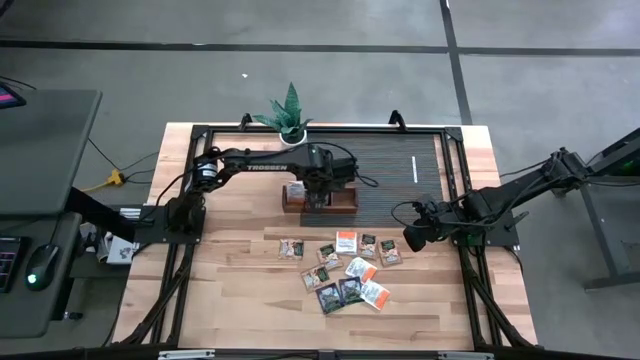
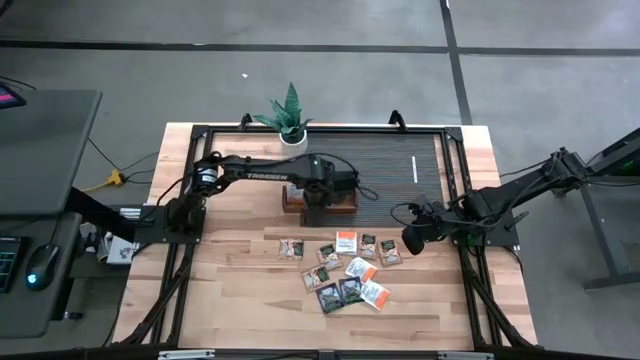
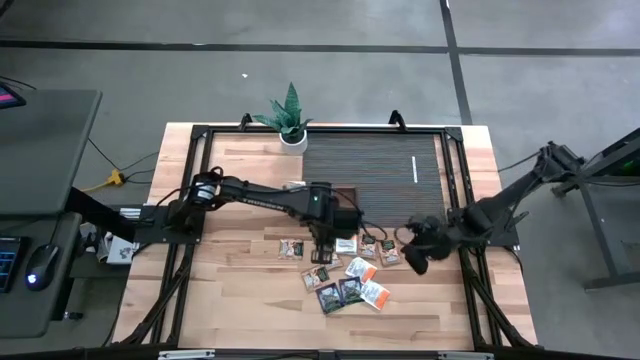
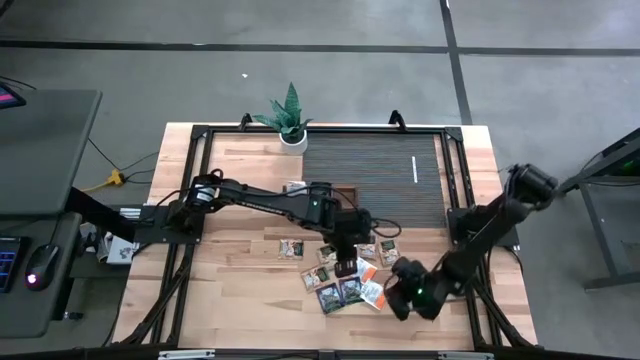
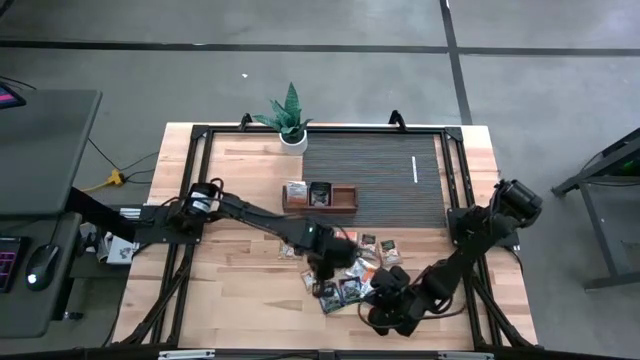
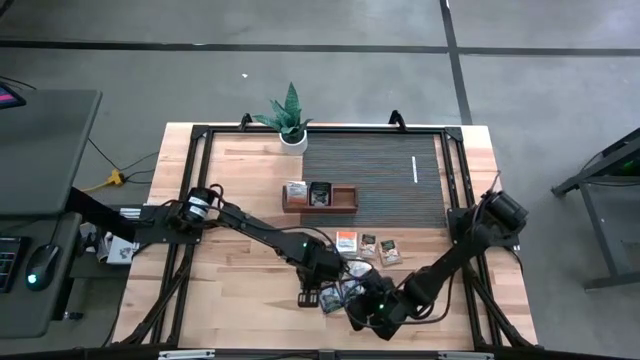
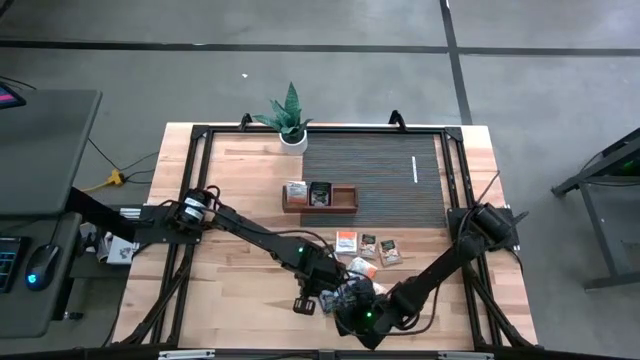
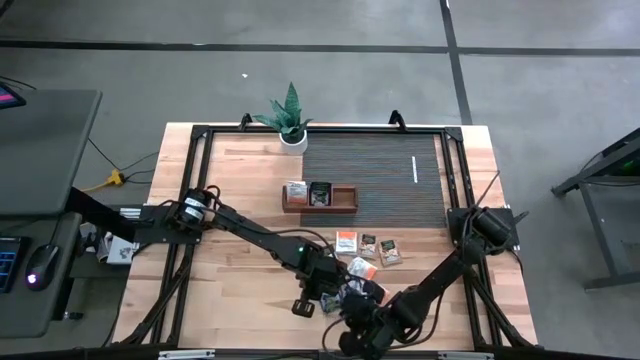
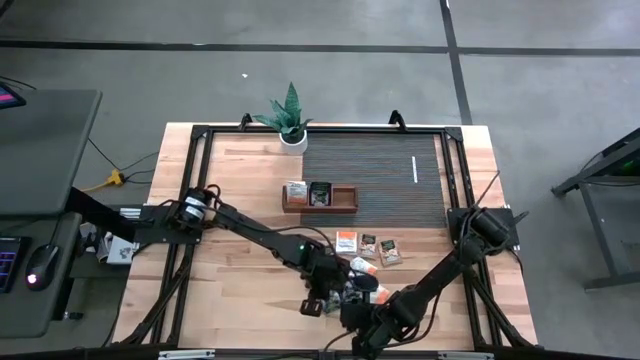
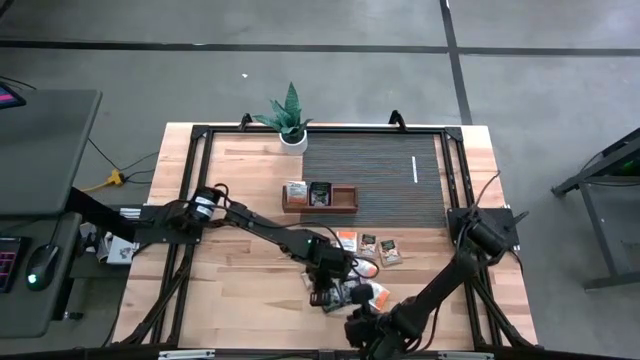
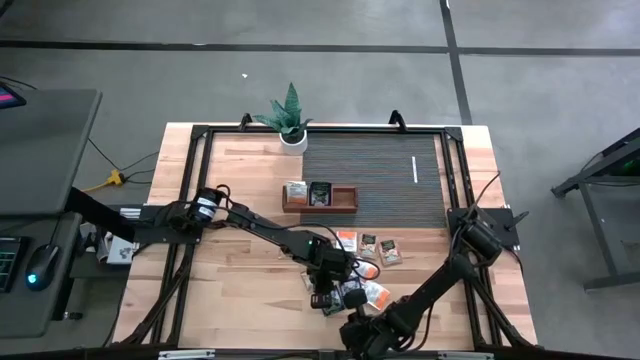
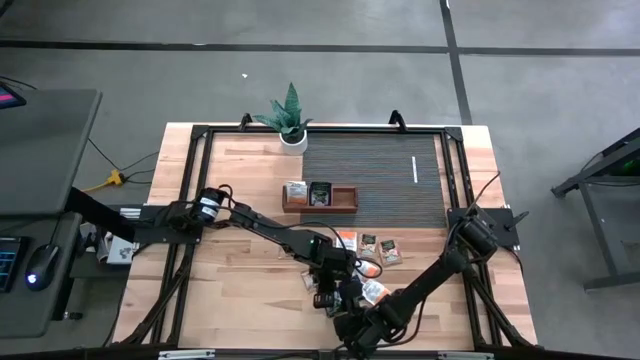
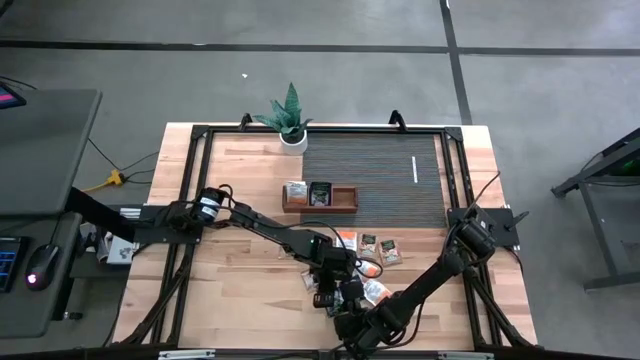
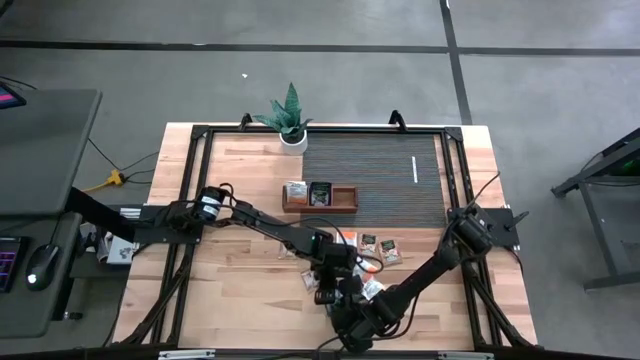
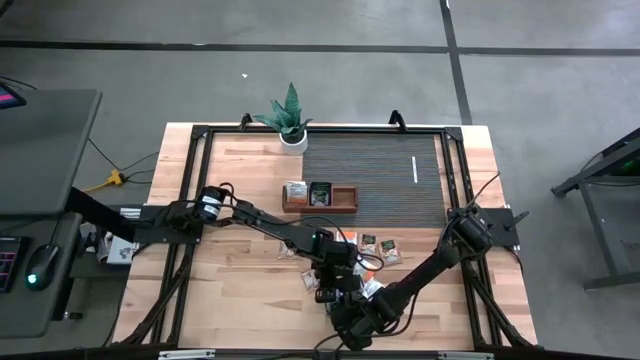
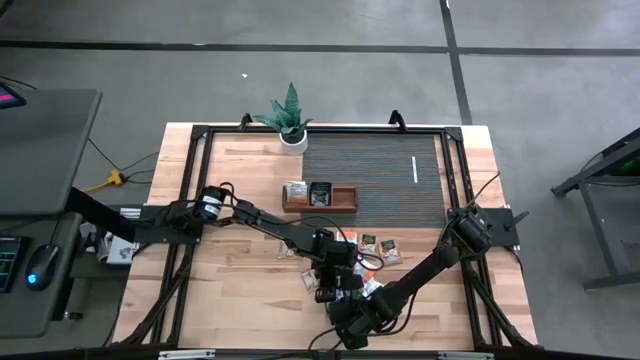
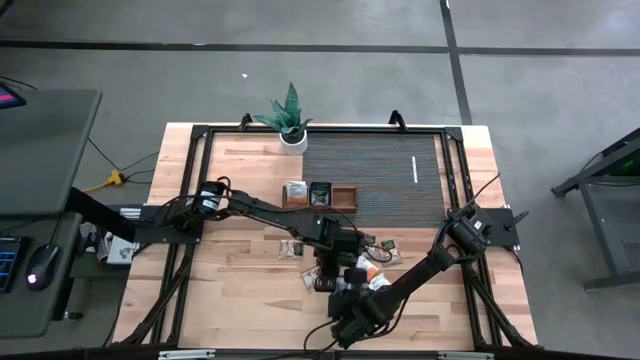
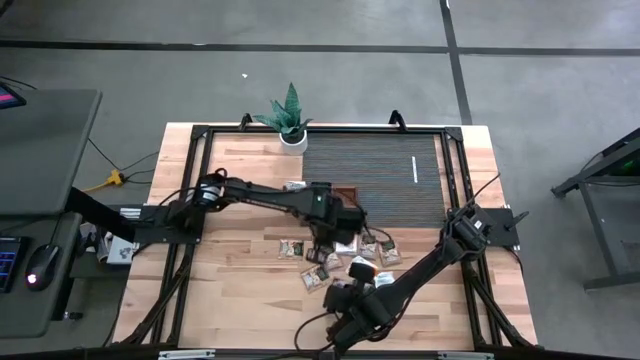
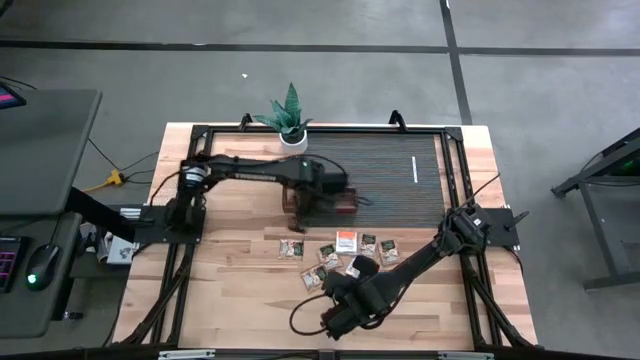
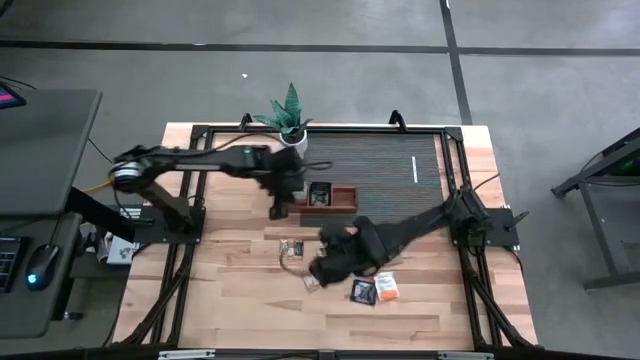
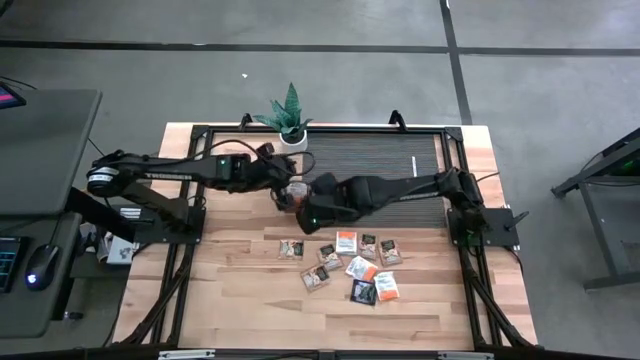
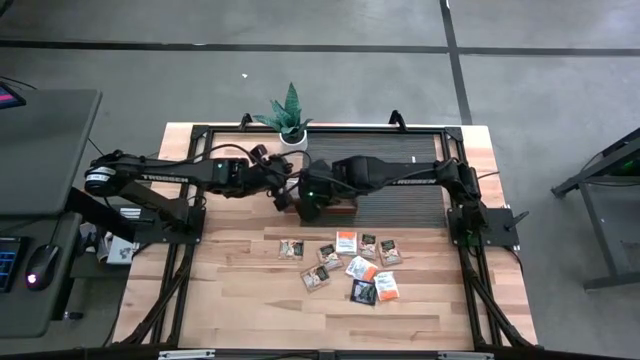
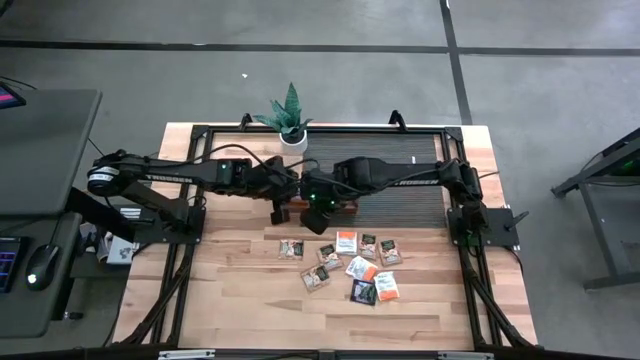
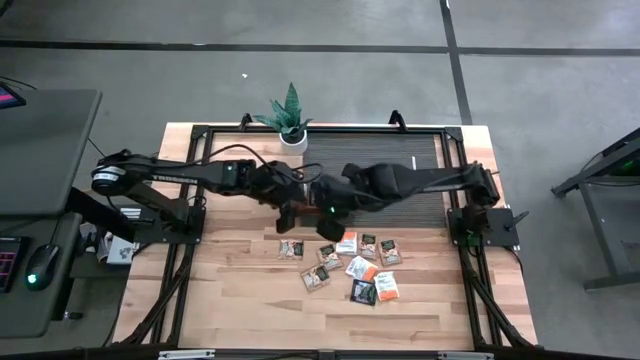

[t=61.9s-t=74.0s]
Task: Pick & Place Tea
Put the blue tea bag into the middle section of the wooden organizer

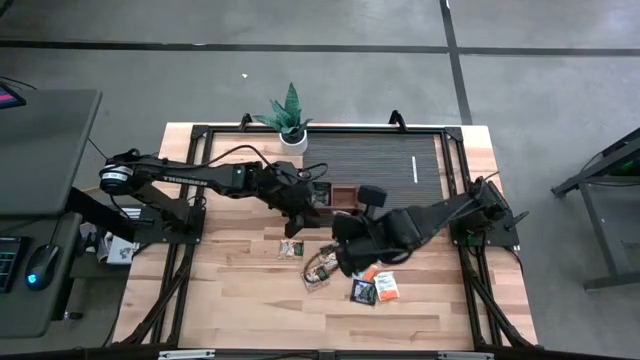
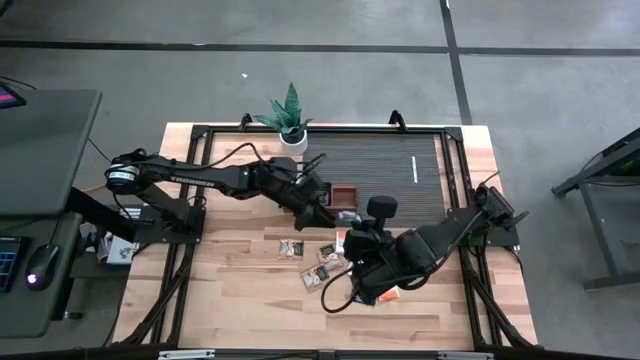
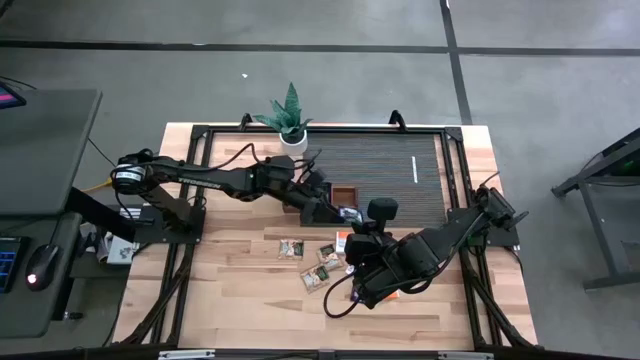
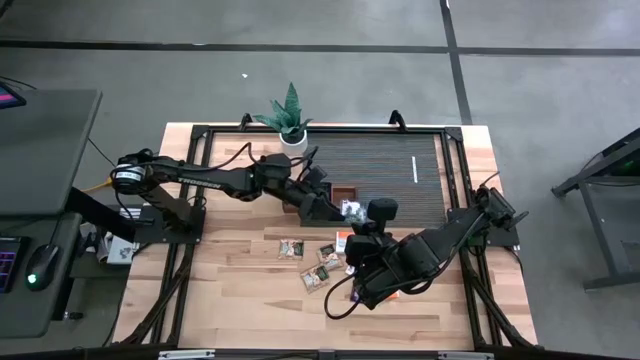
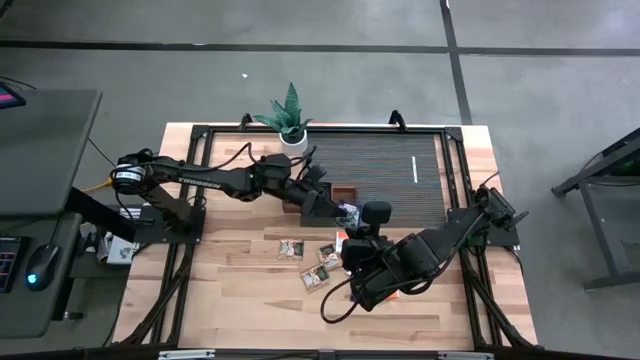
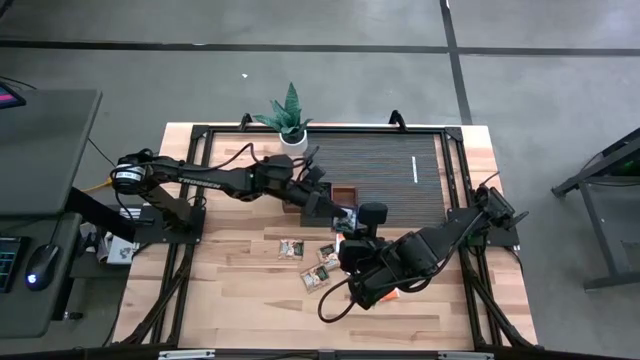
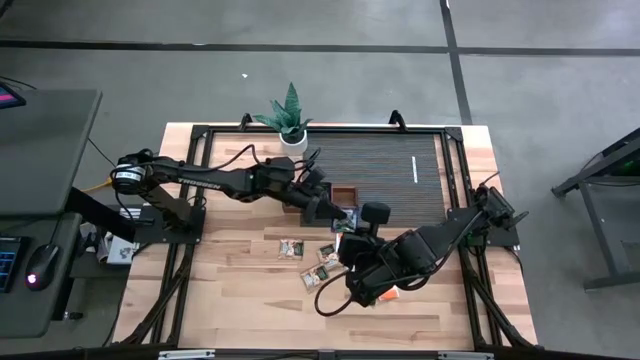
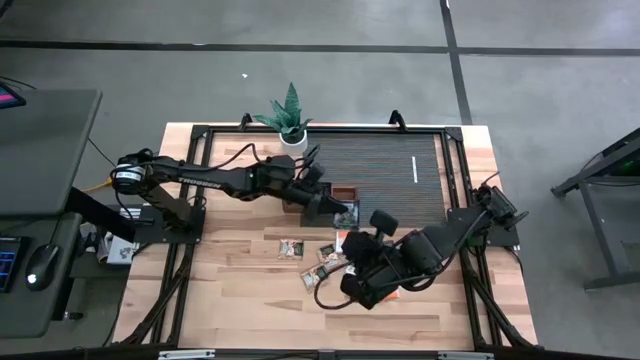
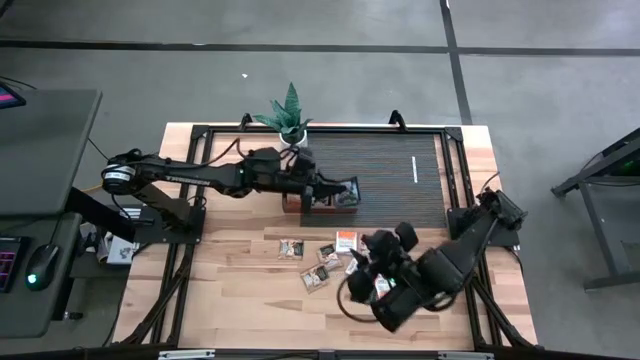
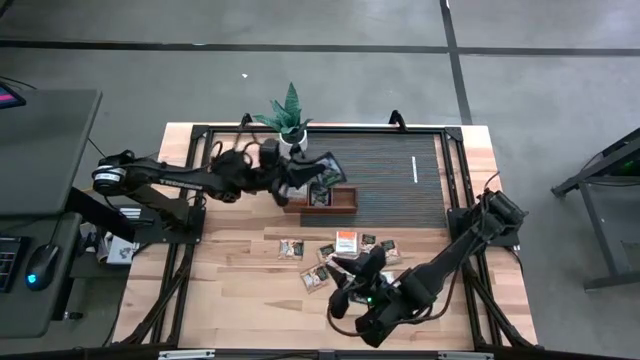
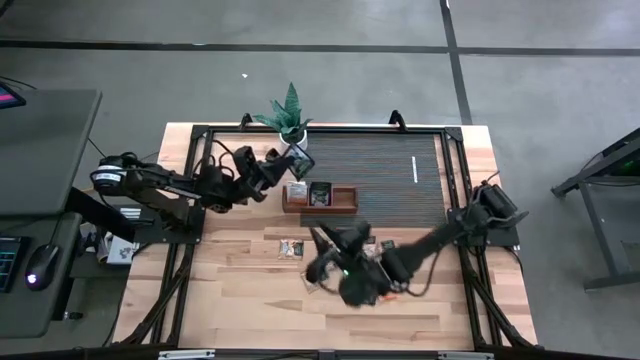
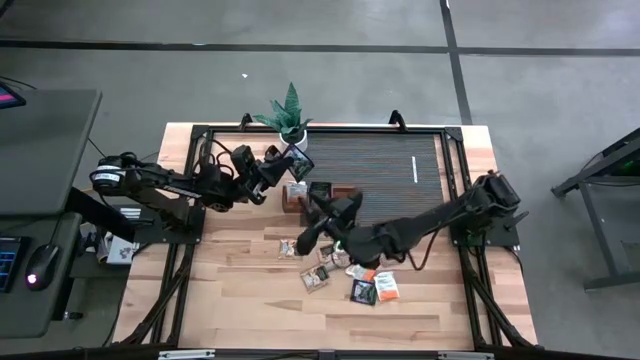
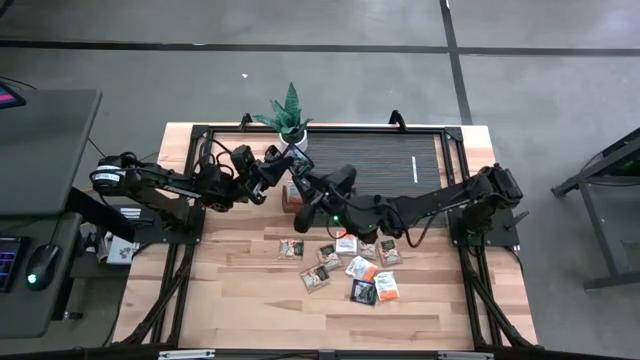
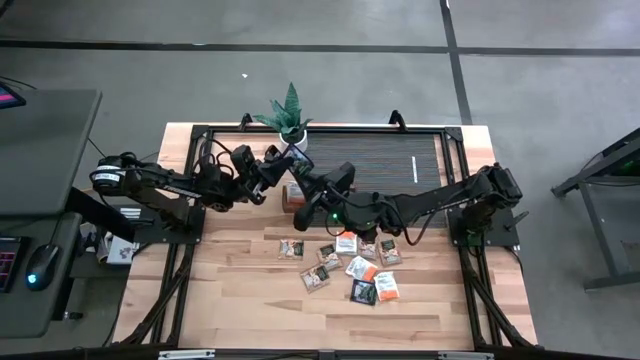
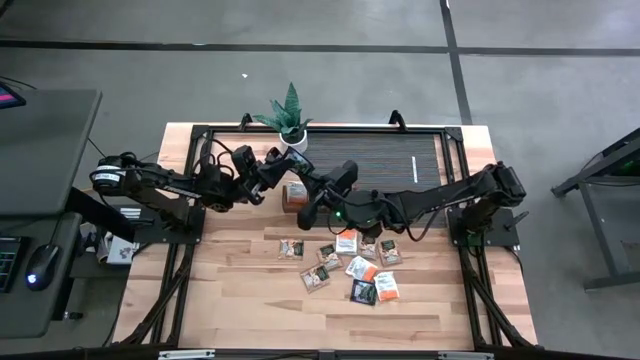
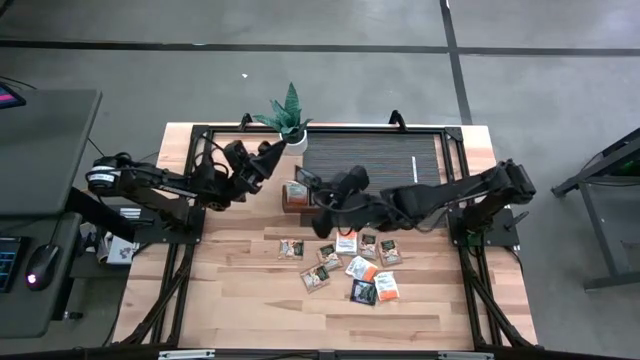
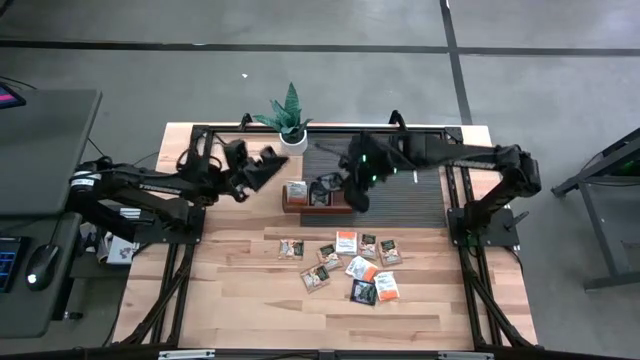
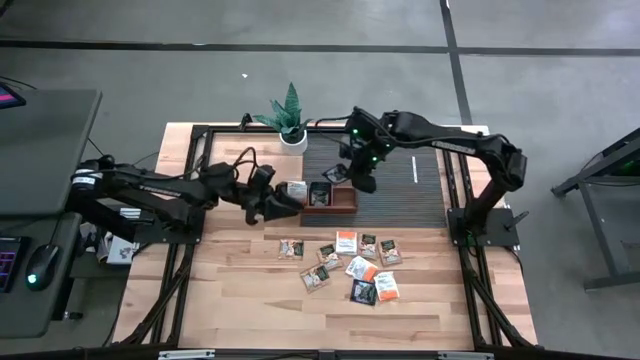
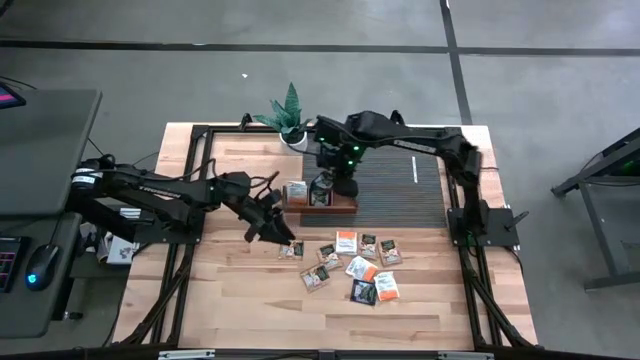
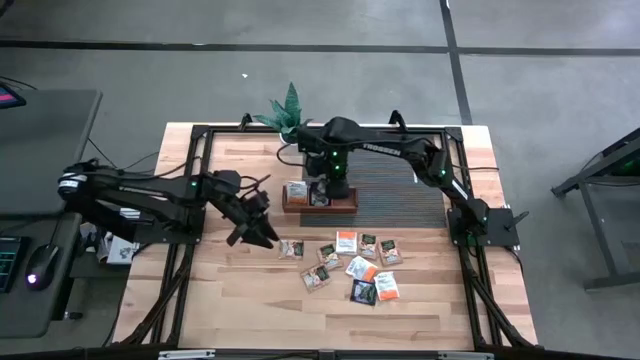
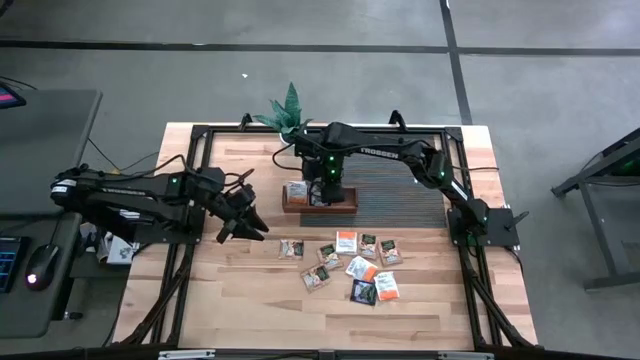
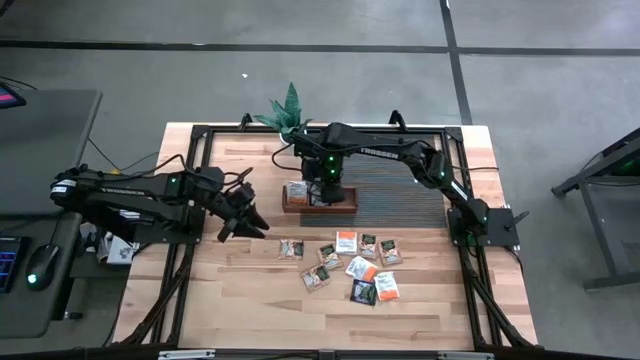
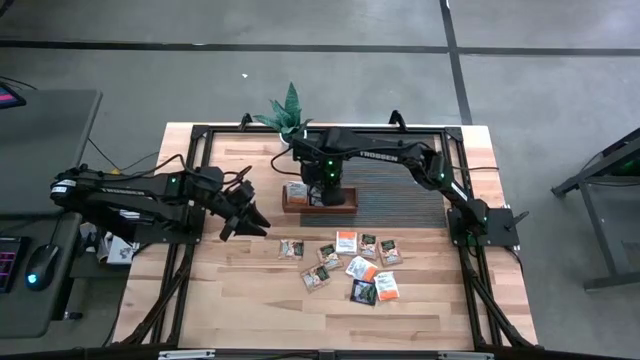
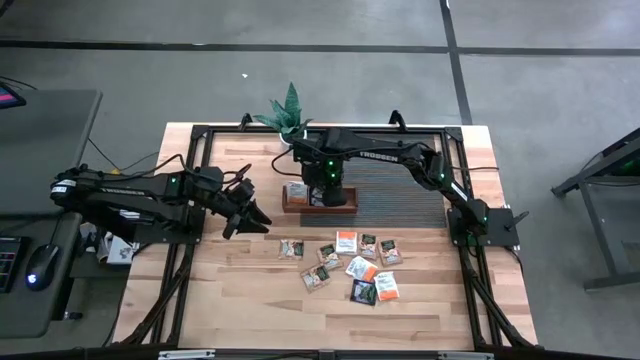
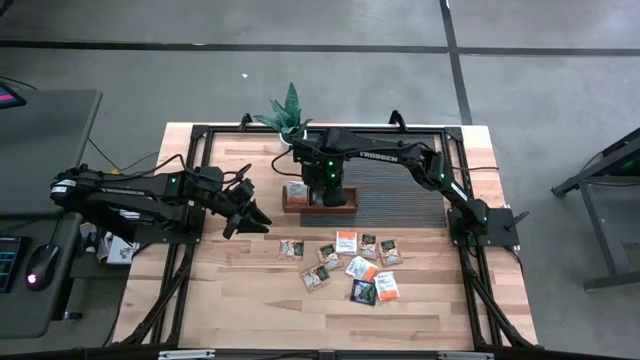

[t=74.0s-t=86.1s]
Put the blue tea bag into the middle section of the wooden organizer
